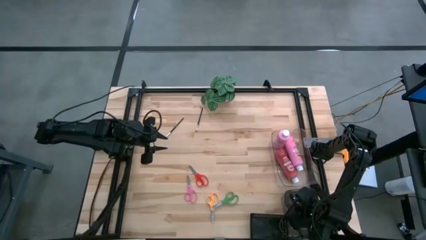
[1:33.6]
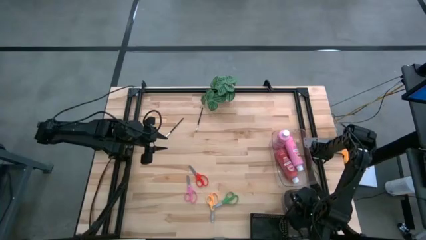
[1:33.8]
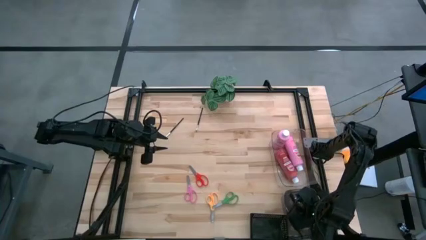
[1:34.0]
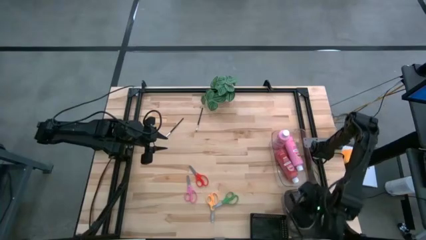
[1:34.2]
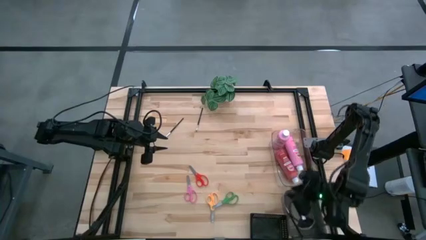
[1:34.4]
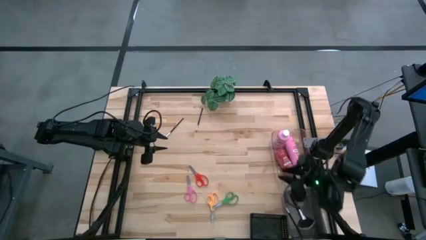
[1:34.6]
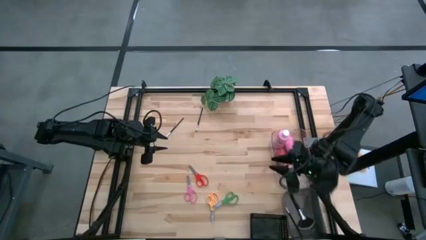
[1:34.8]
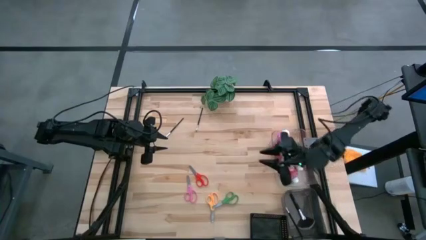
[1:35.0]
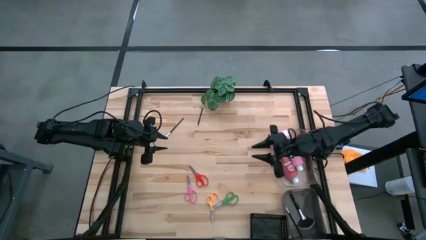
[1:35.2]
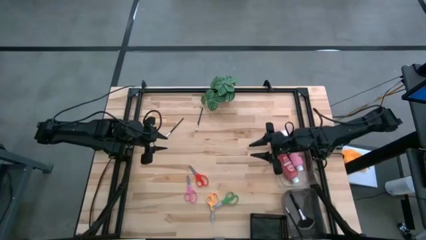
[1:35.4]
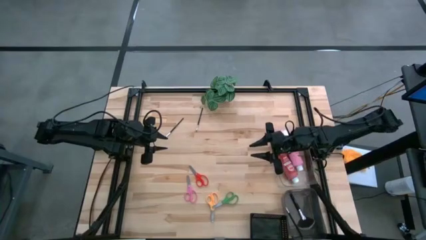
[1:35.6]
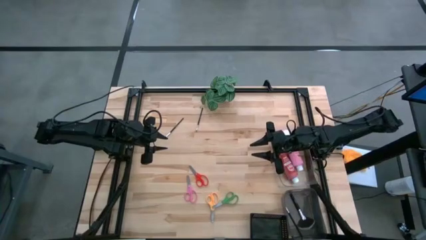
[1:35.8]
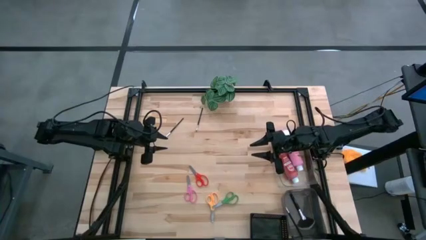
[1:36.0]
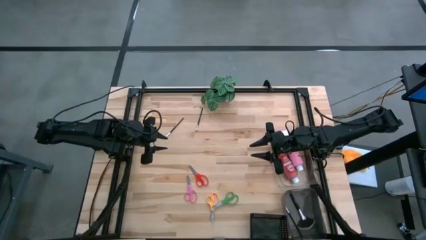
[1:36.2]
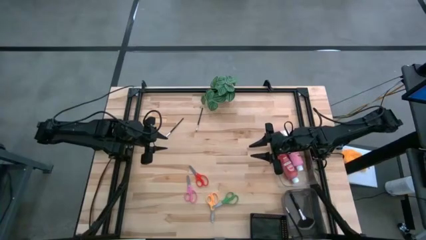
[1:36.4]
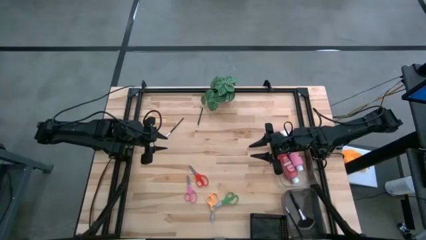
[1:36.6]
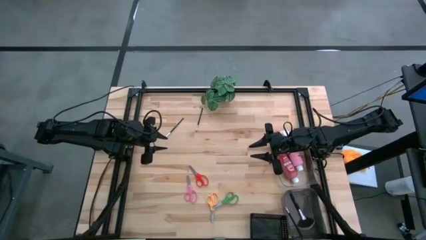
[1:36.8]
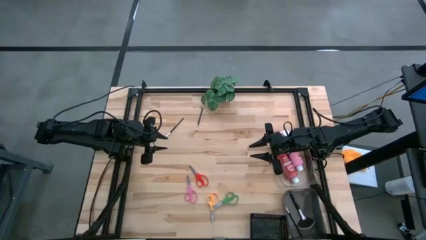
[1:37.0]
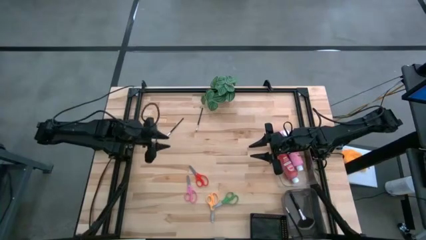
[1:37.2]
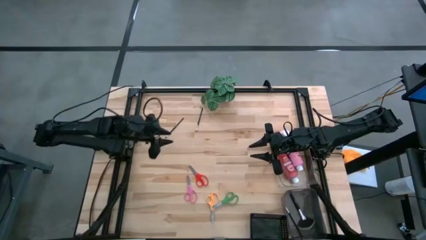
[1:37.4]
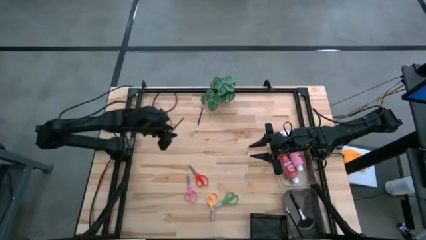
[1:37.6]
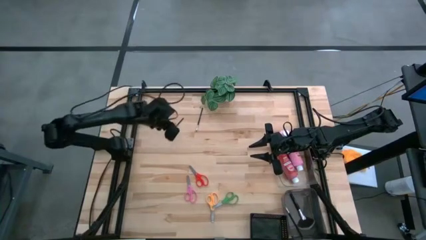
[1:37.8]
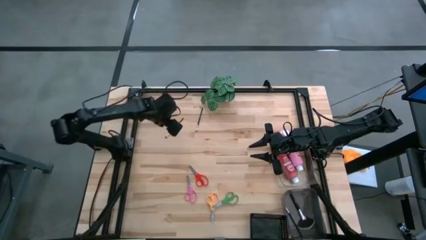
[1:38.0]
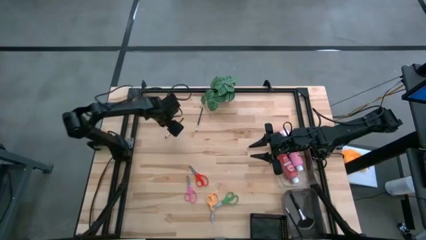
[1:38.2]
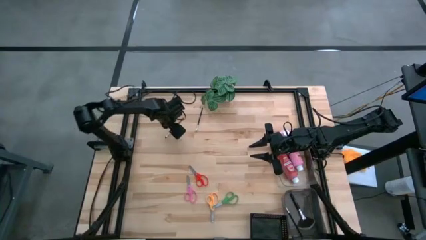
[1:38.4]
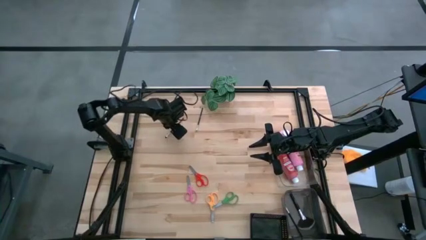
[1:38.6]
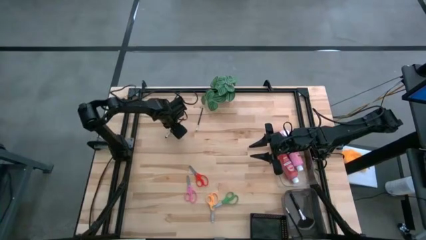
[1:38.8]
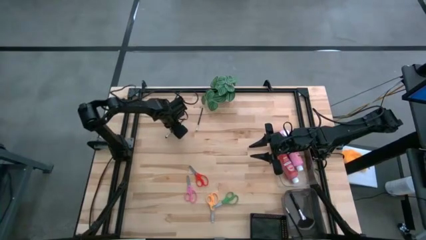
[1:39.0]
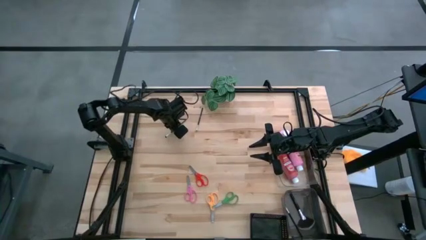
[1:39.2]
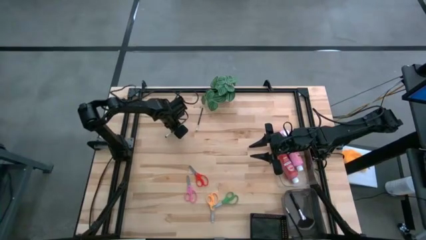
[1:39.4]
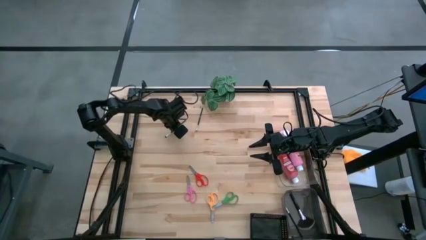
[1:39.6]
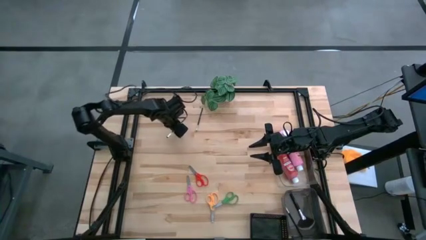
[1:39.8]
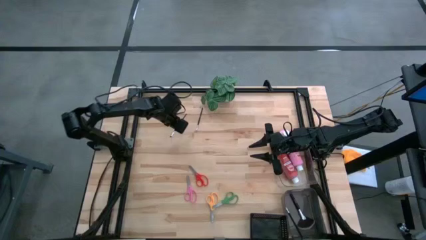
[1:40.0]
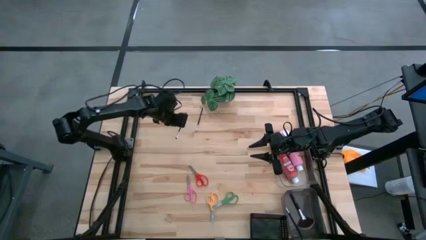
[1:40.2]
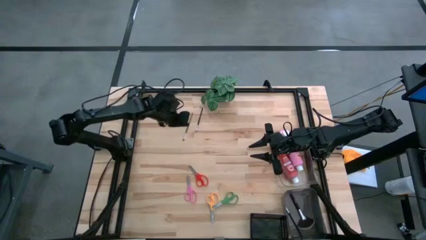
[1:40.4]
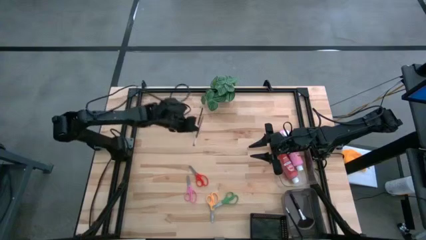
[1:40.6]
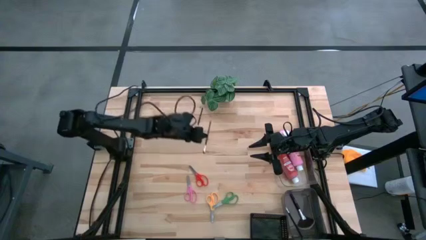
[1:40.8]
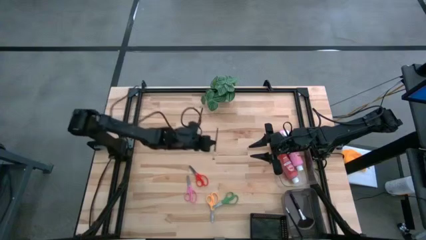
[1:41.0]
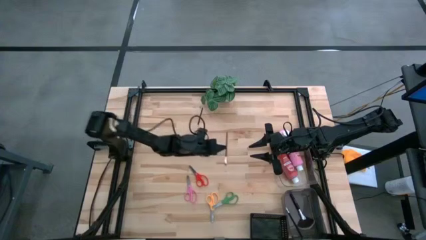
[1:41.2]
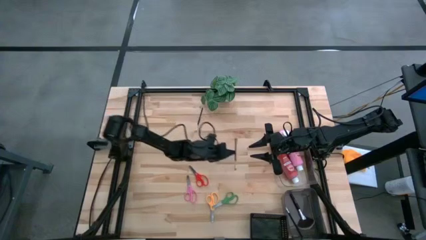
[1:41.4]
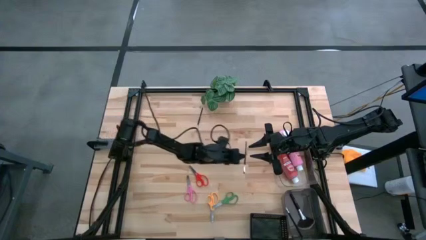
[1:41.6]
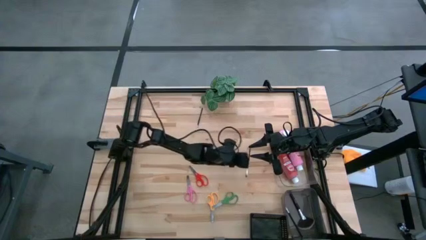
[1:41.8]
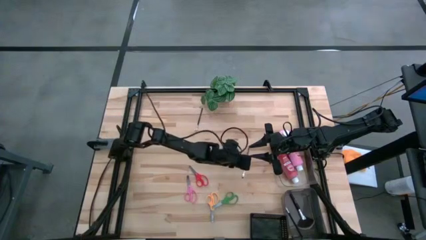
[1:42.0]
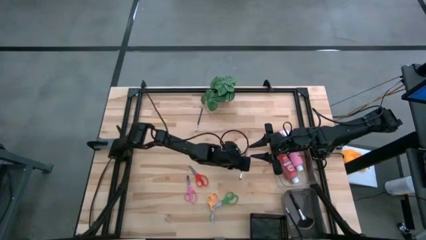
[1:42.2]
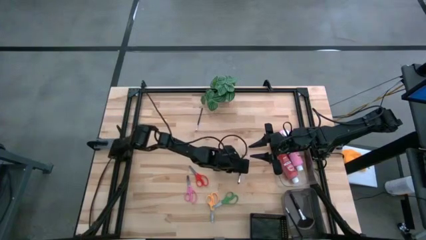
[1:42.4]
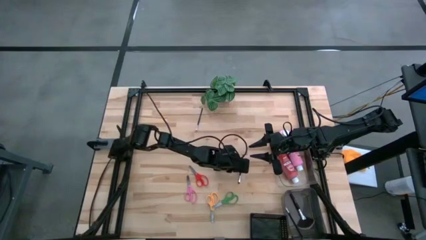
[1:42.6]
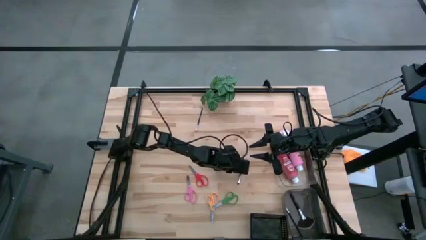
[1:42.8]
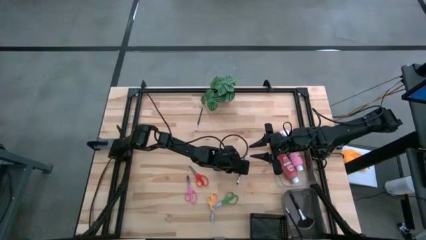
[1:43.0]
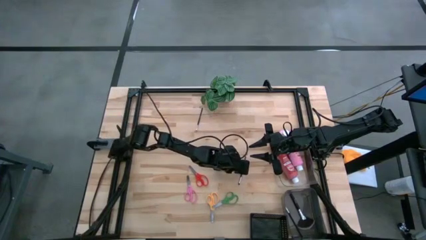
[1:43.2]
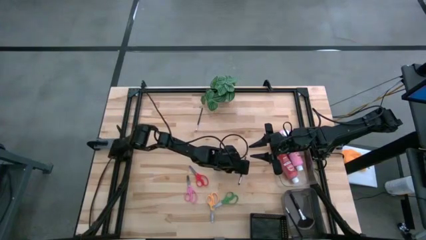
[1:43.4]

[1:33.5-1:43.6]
Task: Pick & Place Paint Supplies
Put the black paint brush into the gray bin
